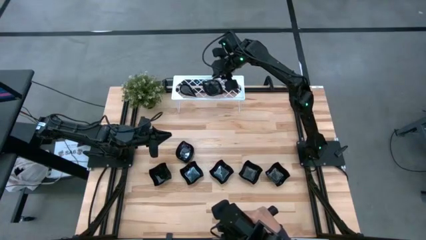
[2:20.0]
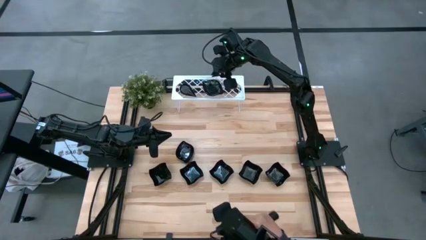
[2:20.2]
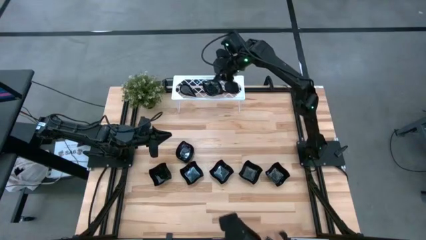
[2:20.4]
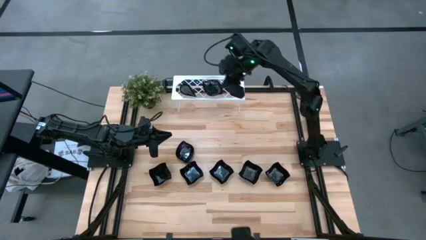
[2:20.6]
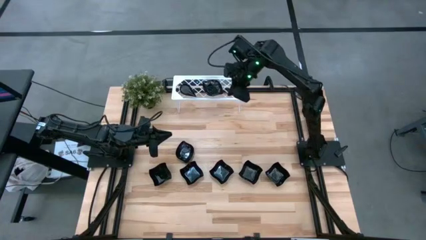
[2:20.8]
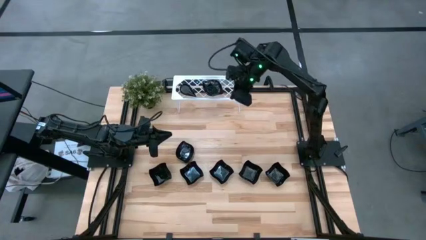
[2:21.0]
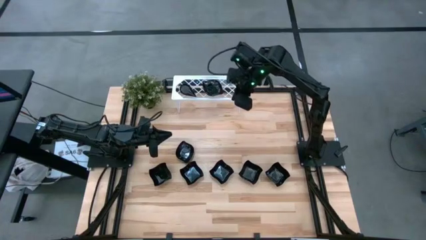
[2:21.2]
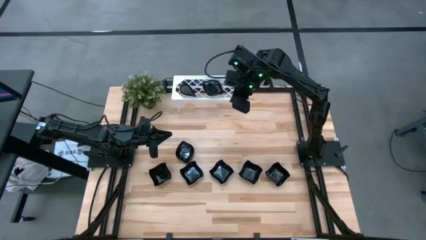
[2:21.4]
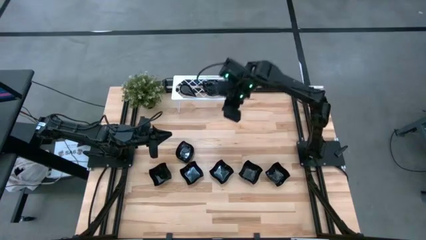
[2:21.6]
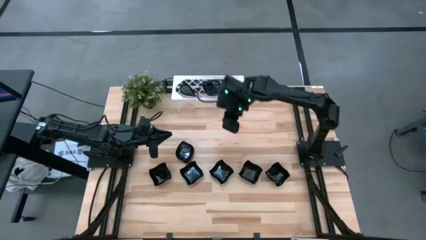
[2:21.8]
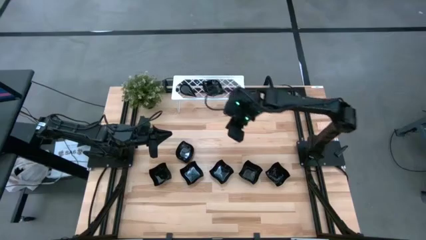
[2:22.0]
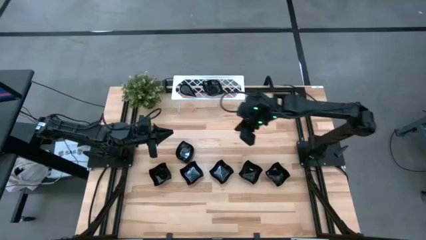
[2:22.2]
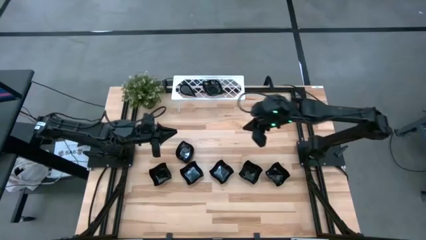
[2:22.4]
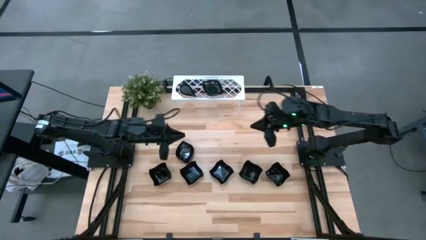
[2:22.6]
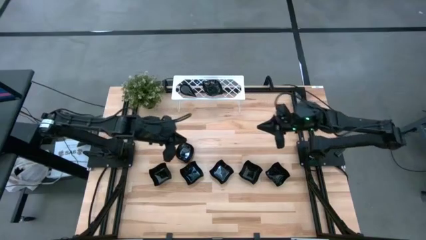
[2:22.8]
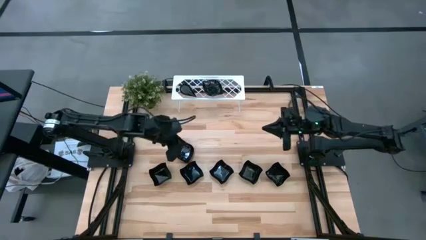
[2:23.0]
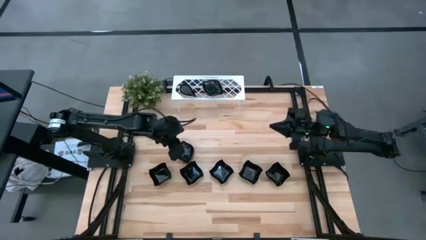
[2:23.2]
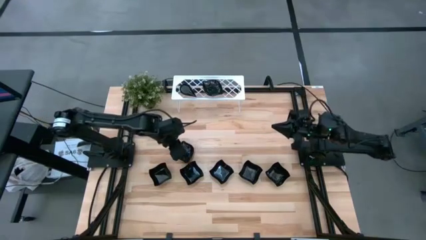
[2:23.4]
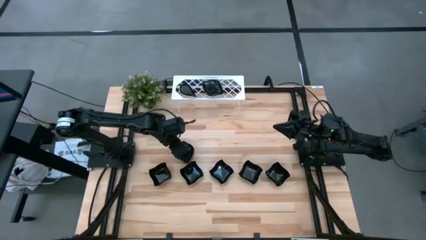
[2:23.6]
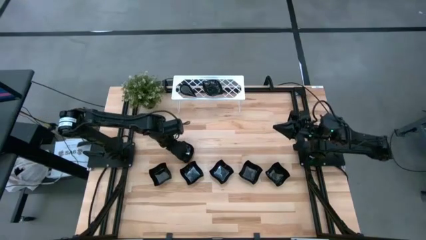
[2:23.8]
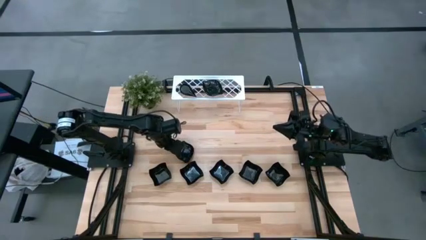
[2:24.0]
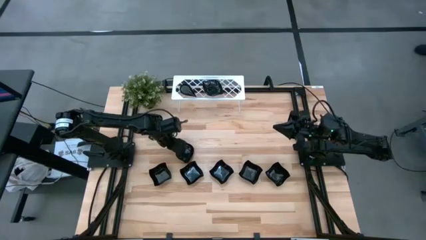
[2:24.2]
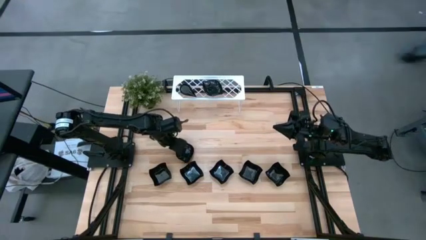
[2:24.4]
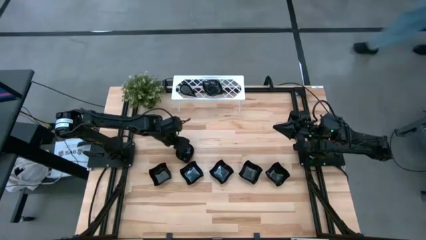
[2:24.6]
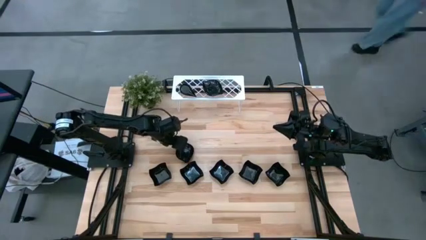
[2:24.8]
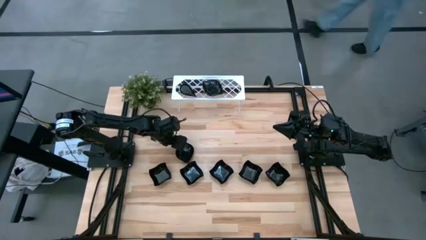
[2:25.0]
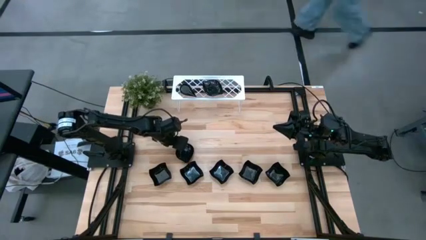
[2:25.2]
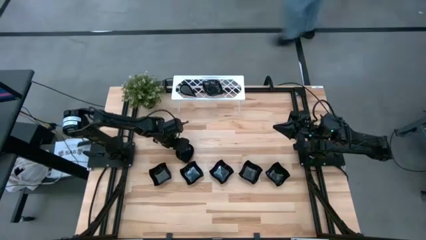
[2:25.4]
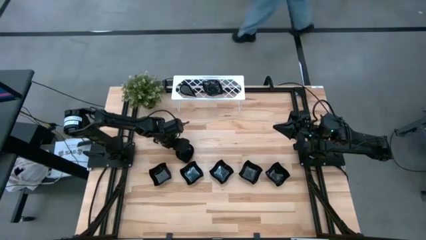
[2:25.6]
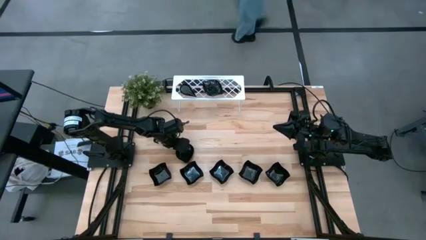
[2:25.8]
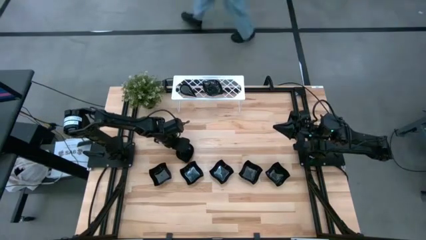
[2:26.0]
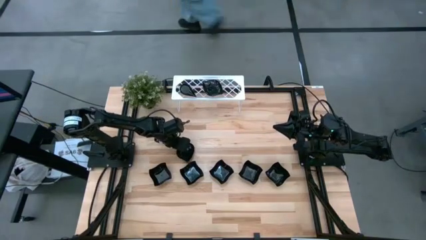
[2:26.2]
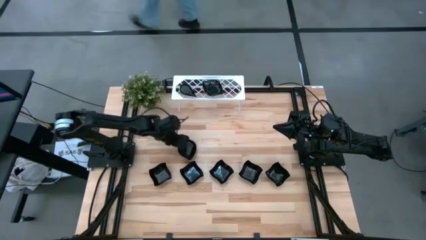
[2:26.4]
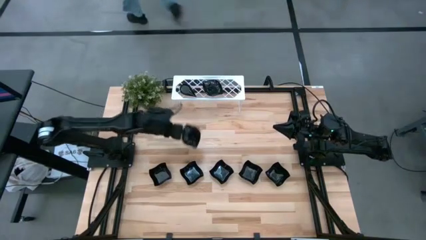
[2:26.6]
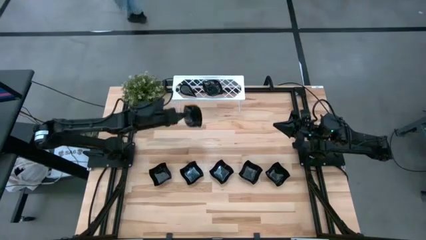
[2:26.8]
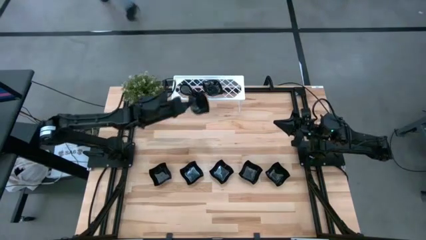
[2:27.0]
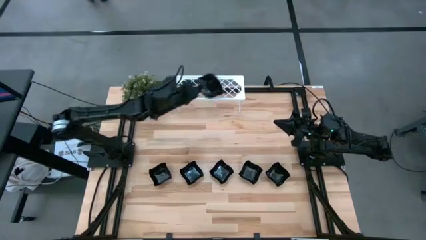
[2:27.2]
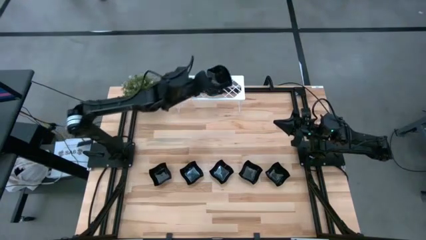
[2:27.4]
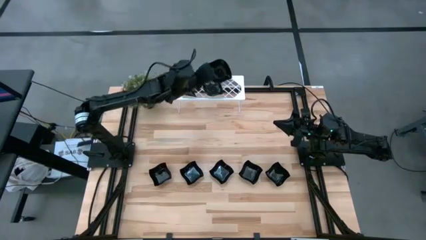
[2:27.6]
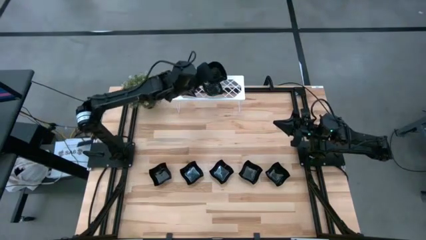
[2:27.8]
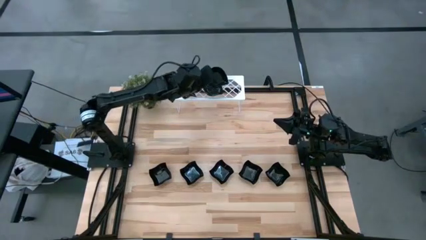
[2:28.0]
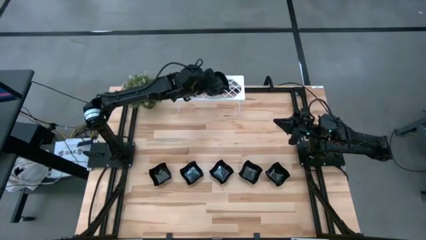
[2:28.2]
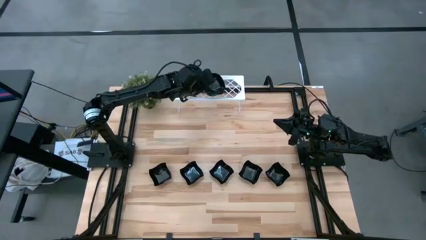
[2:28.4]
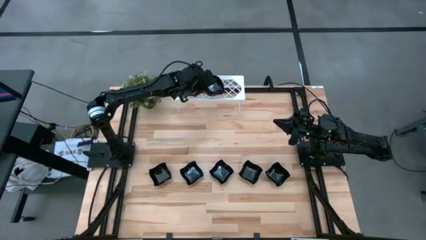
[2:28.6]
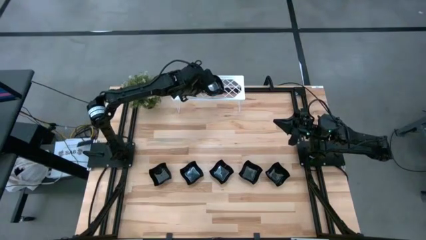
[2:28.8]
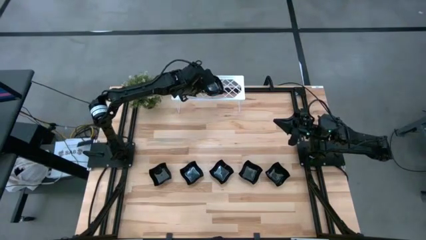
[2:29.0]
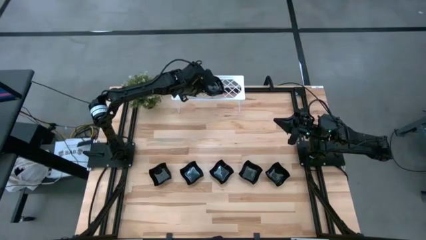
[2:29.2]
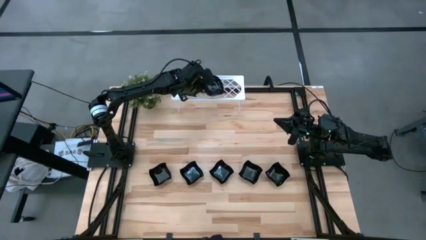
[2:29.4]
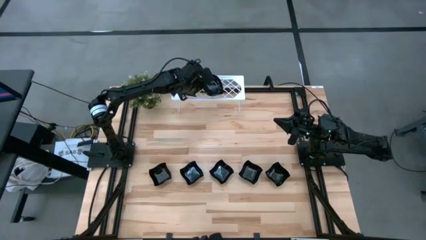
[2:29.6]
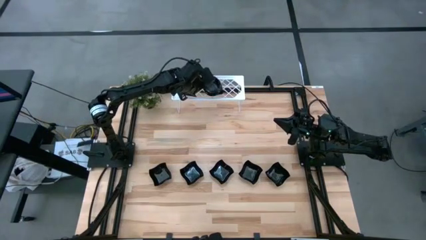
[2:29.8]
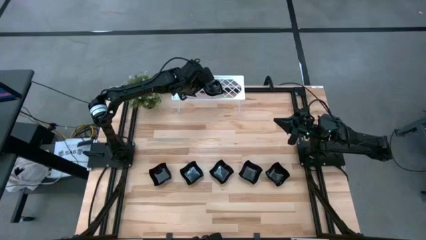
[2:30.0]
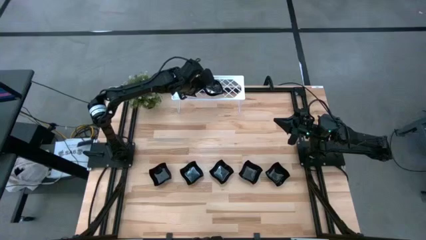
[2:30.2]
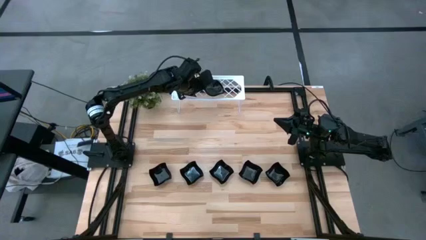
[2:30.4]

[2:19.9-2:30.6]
Task: Pick & Place Mini shaped plates
Stack the black leaf shaped plate on top of the black leaf shaped plate on the shelf
